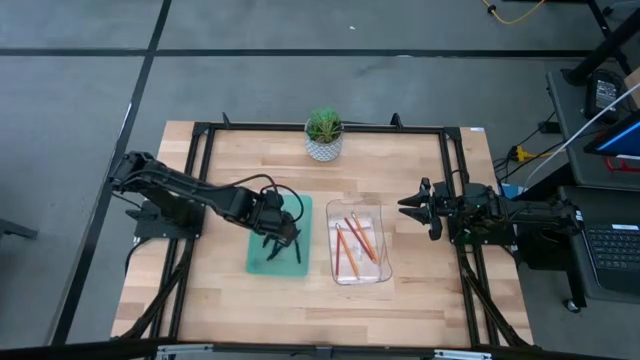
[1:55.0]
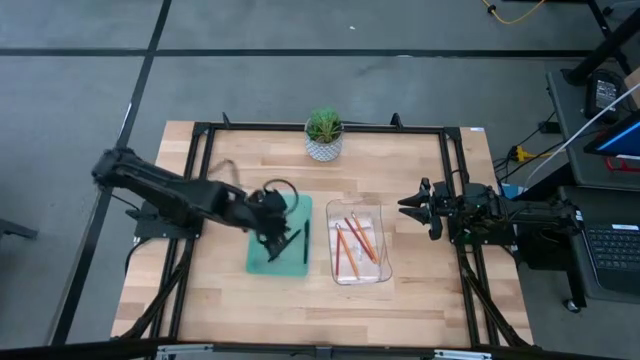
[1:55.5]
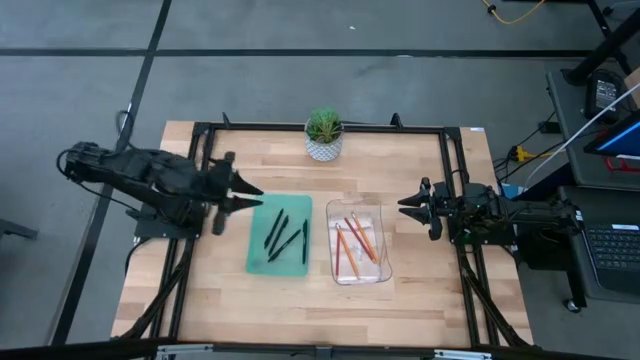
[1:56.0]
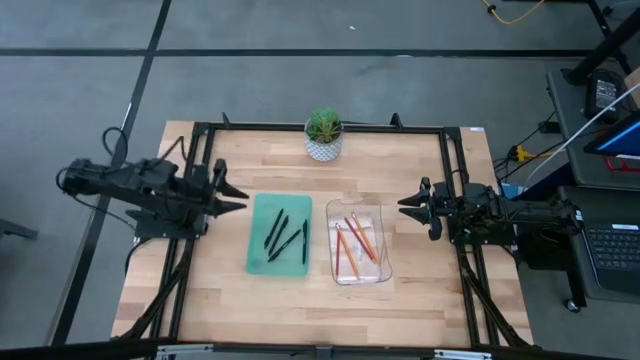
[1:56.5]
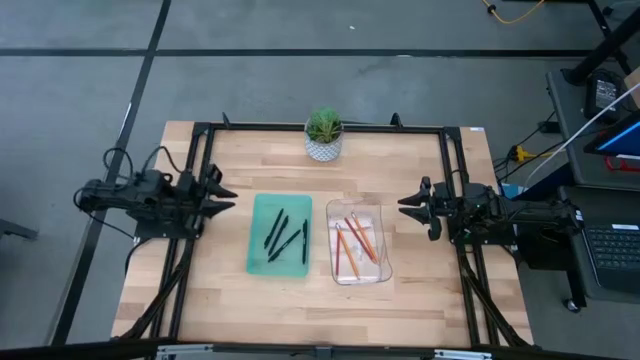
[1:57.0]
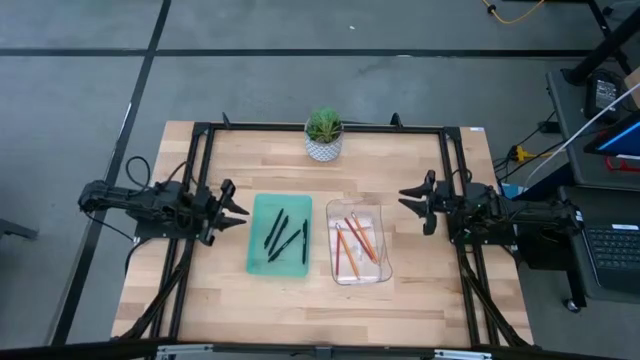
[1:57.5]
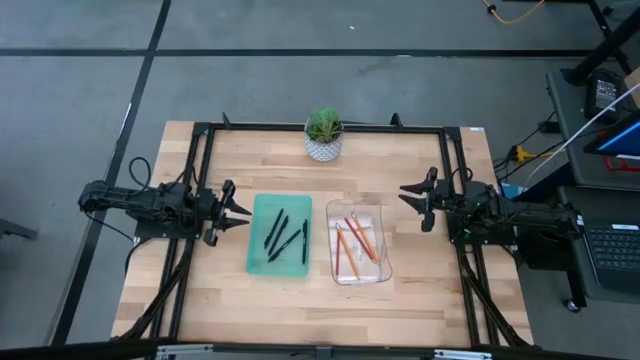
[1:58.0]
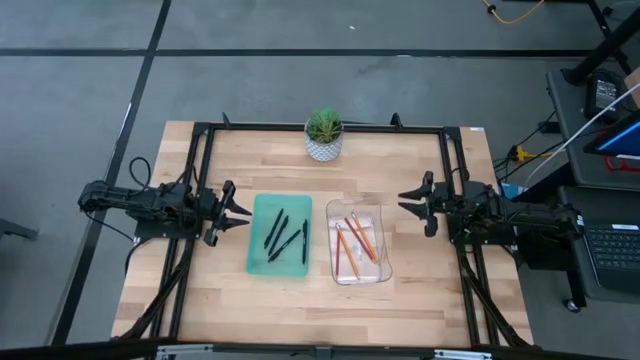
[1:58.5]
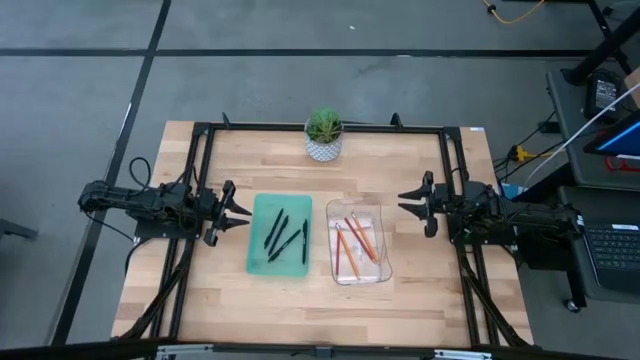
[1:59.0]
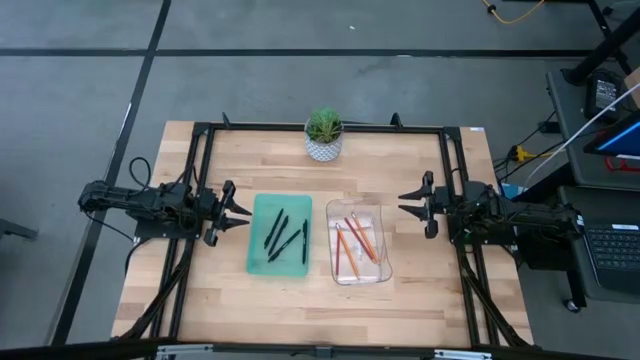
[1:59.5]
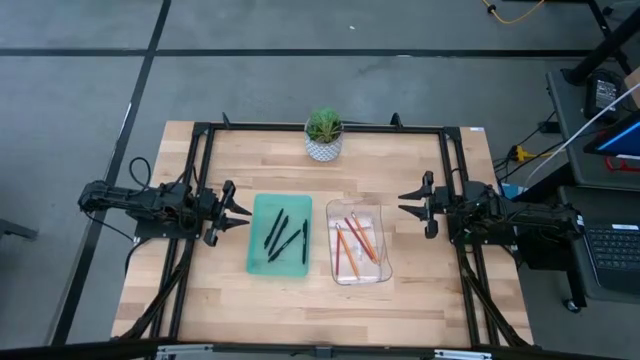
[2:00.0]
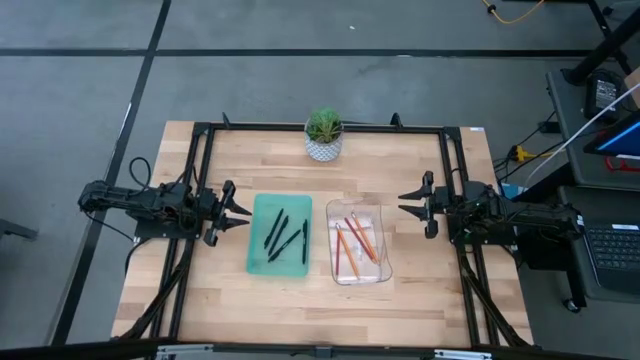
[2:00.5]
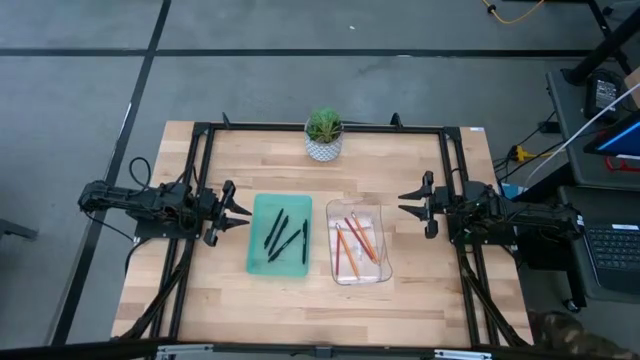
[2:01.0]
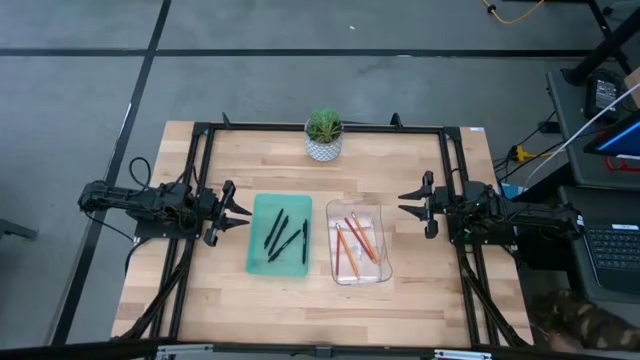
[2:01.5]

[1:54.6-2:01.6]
Task: Sort pens & pencils
Return to Home Position

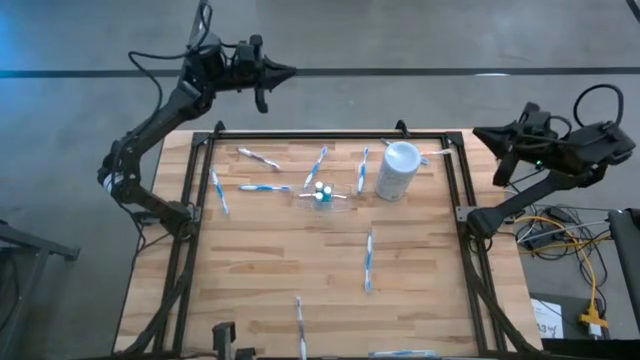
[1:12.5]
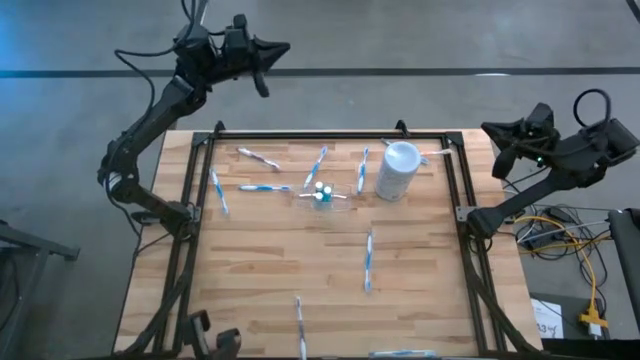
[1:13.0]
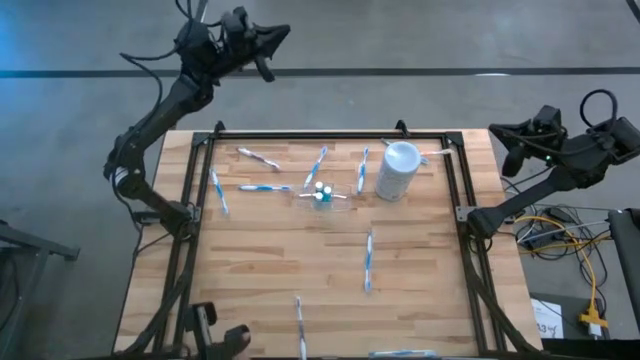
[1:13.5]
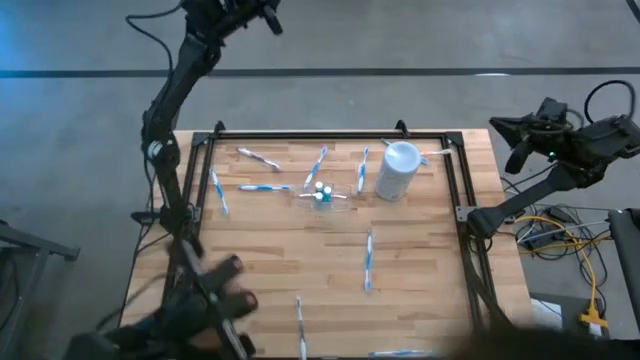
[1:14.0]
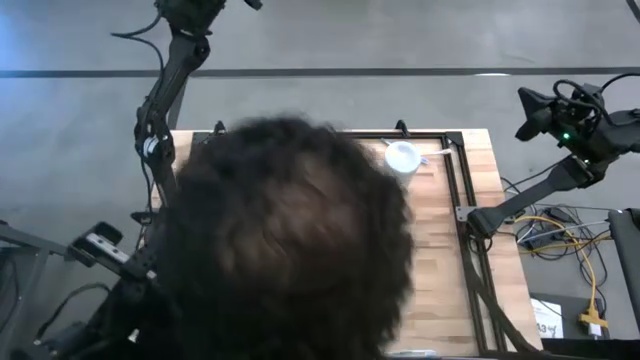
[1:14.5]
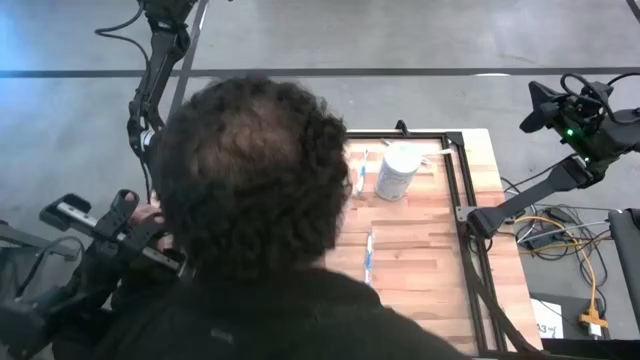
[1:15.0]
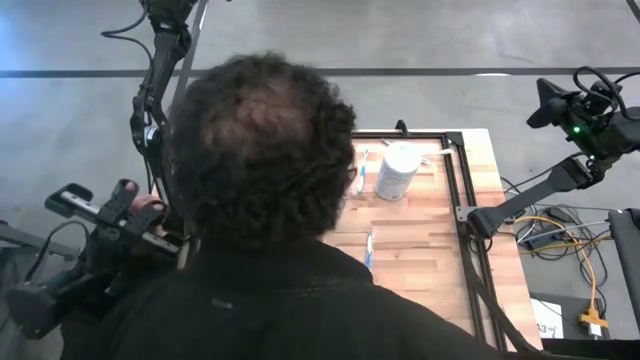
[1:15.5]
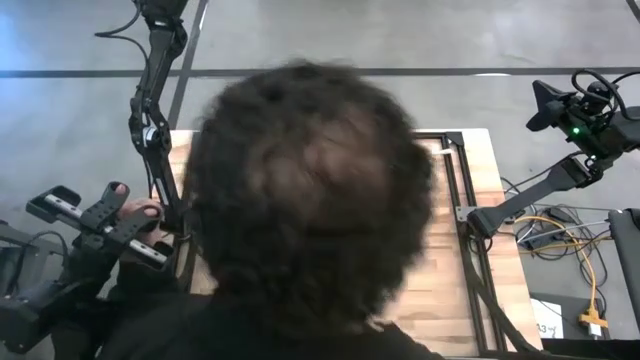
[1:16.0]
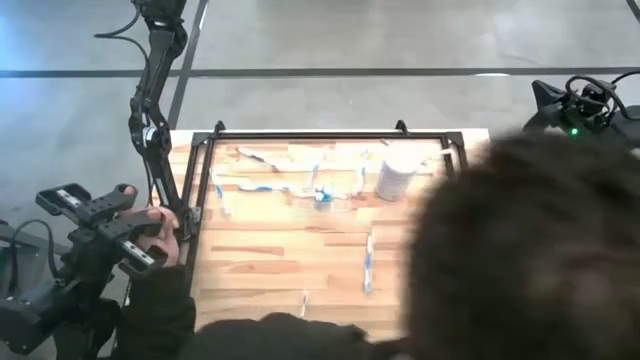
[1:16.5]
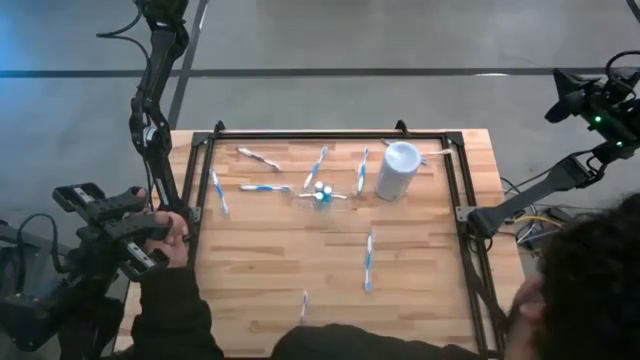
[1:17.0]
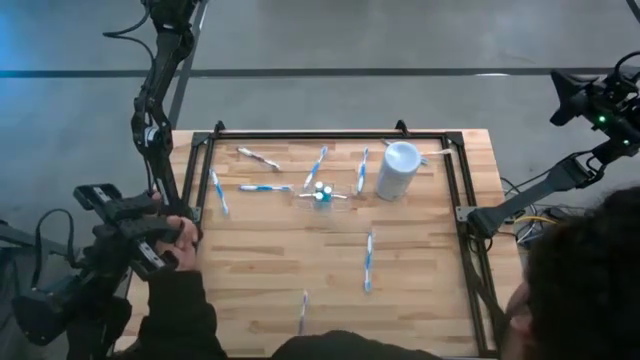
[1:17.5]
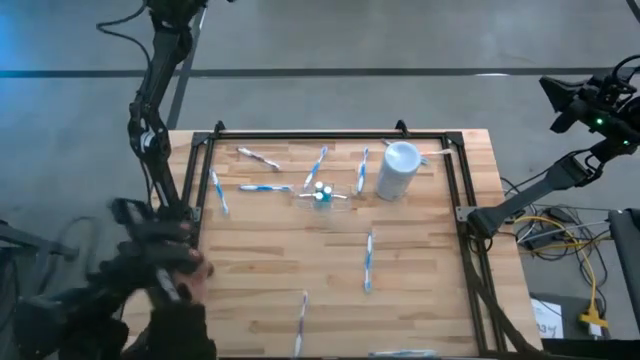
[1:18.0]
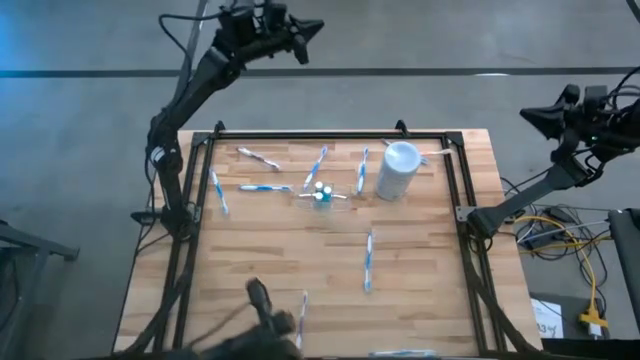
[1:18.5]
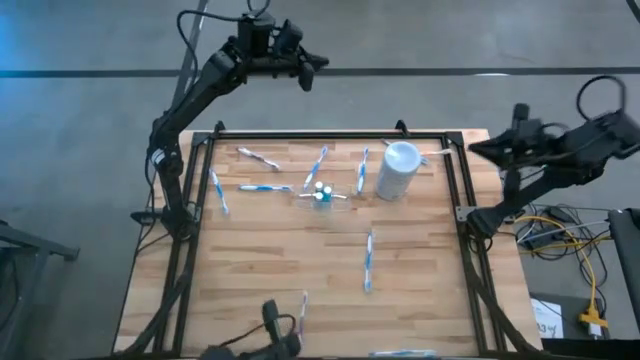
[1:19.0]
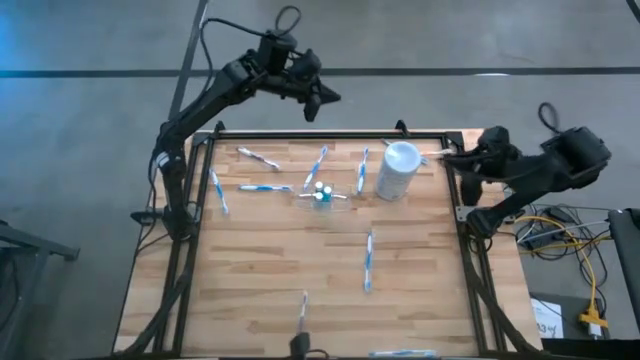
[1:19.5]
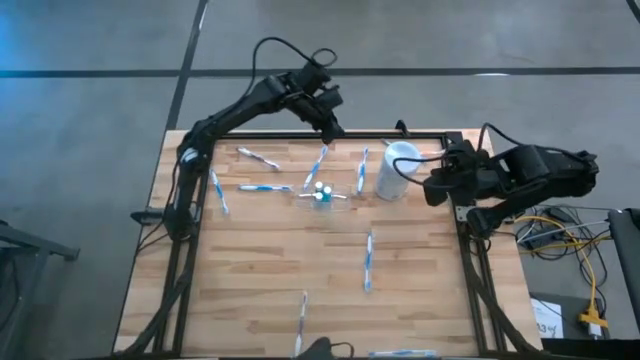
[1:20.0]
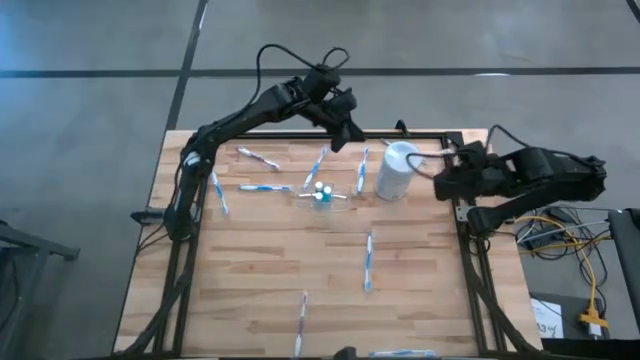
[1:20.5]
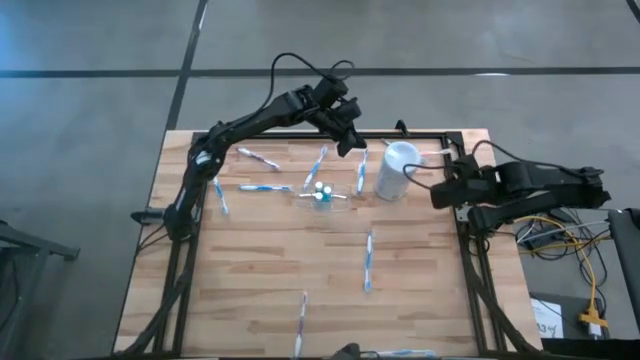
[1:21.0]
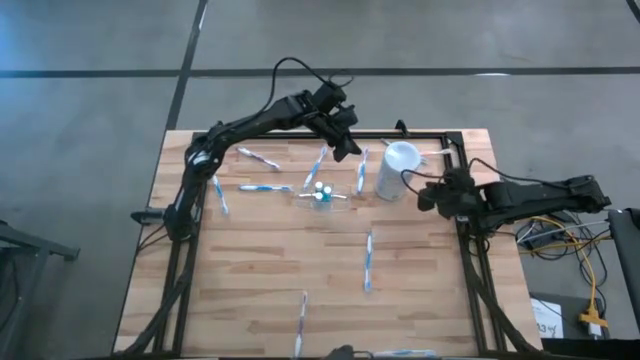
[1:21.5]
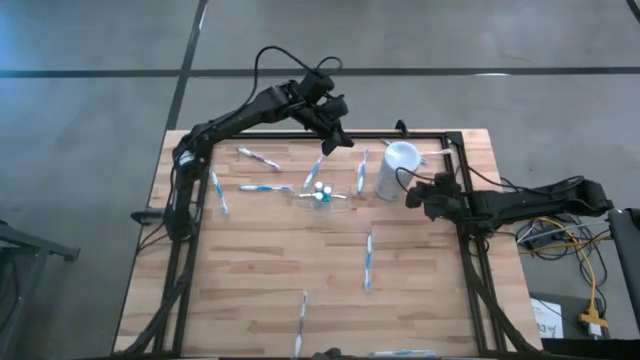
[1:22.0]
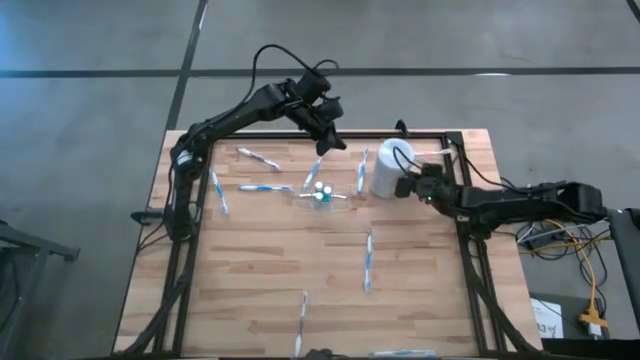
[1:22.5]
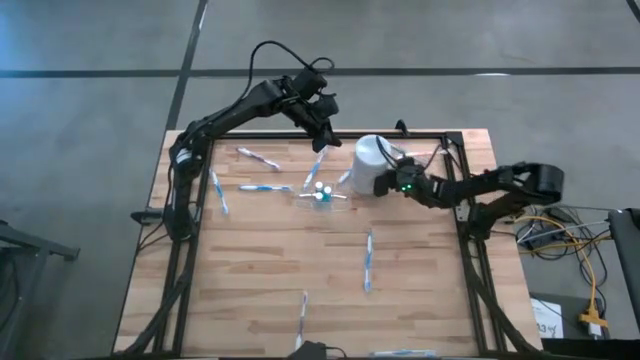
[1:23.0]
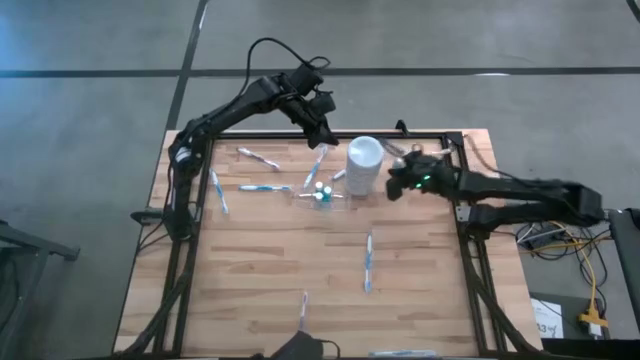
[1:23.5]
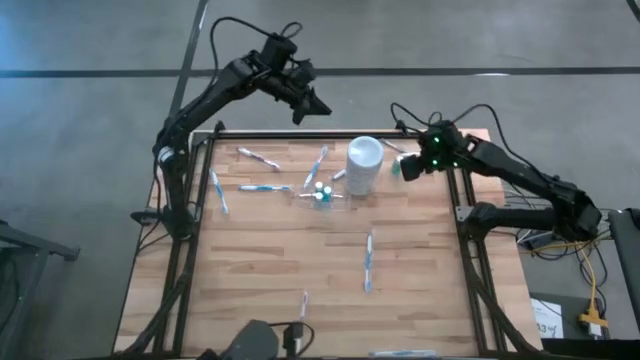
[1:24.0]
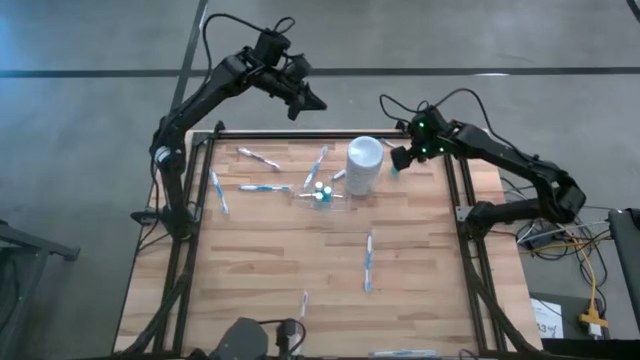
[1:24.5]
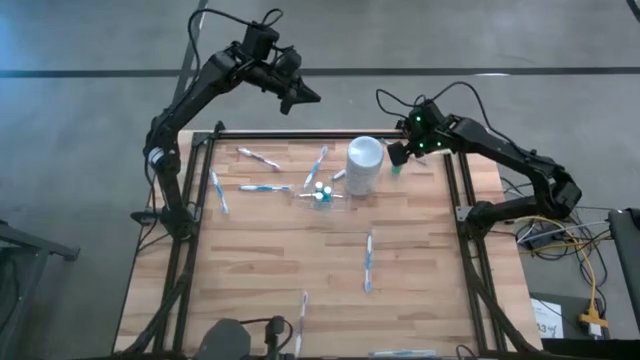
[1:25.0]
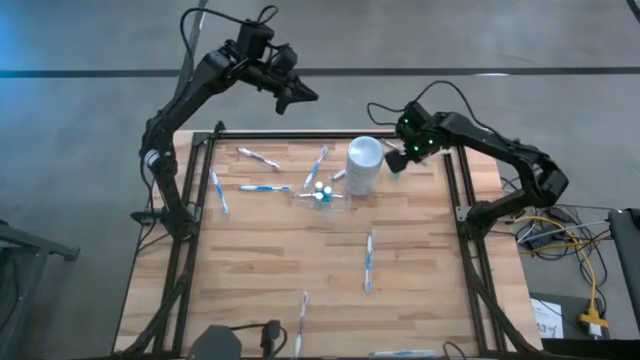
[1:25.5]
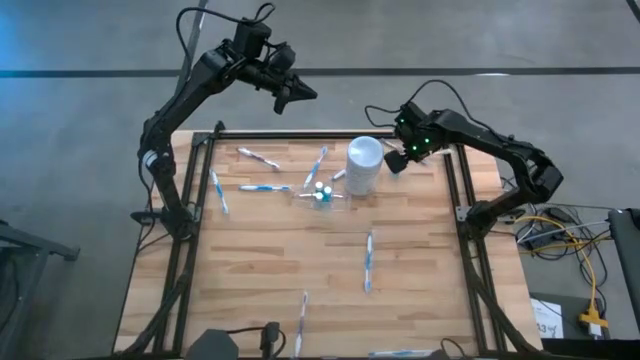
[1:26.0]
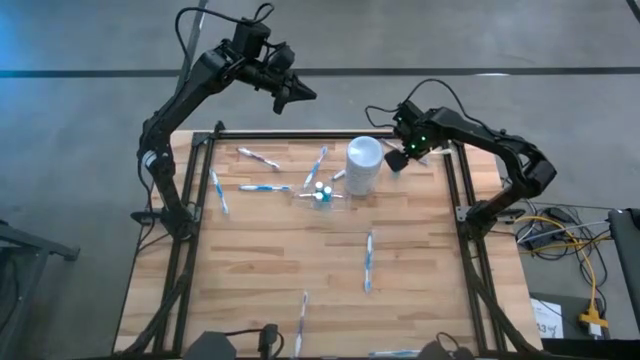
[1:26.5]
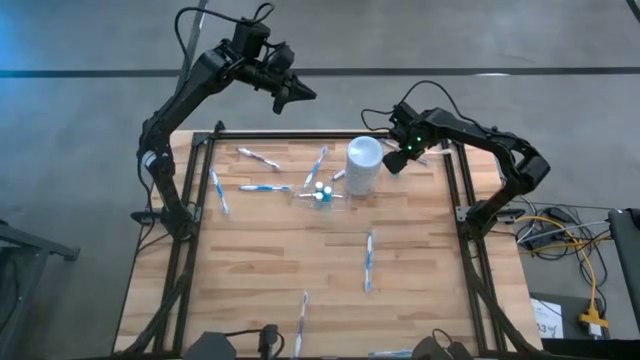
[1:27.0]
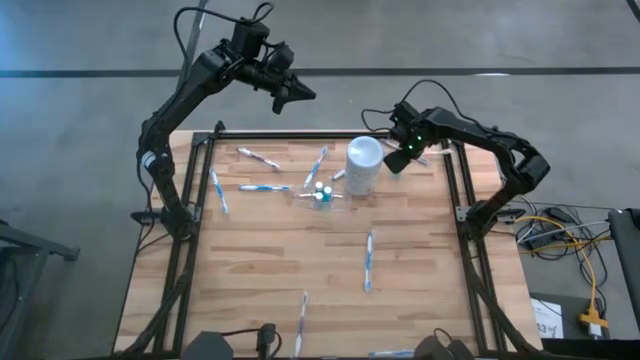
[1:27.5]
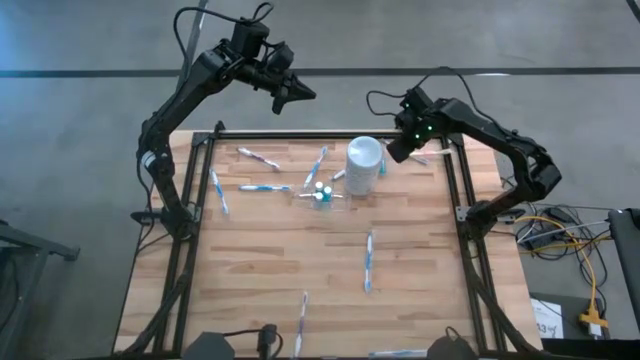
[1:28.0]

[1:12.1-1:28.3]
Task: Pick & Place toothbrushing station
Put the mouthwash into the transparent organizer
